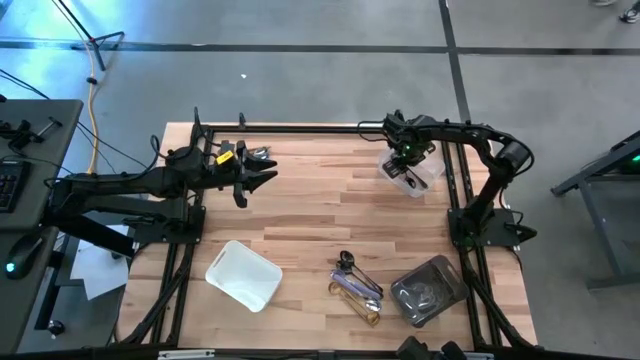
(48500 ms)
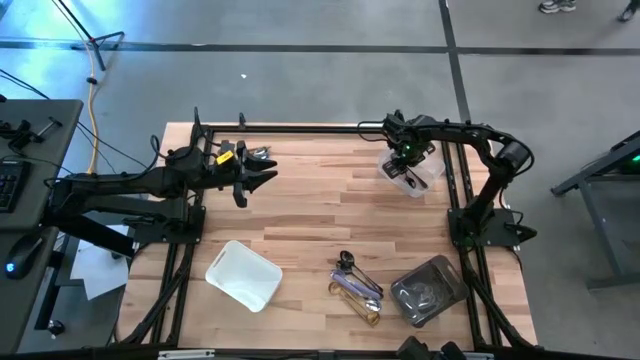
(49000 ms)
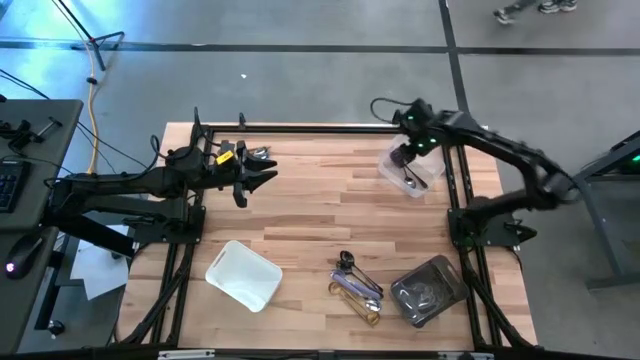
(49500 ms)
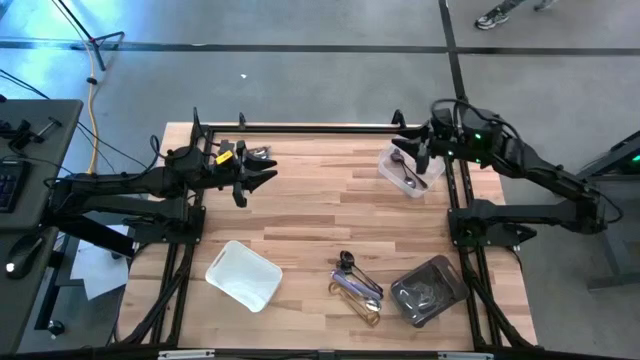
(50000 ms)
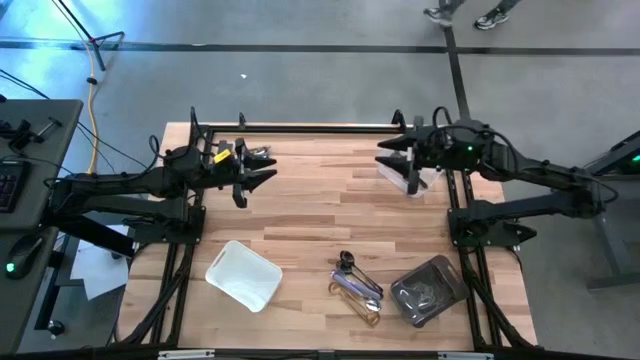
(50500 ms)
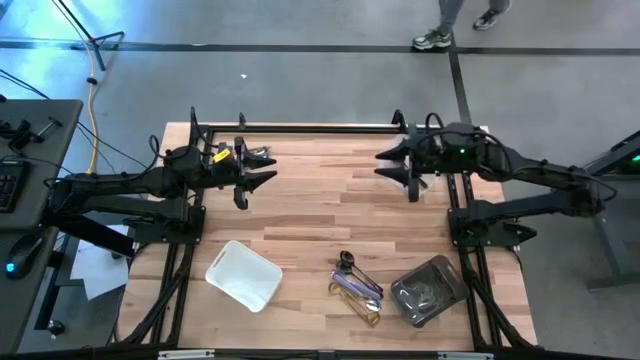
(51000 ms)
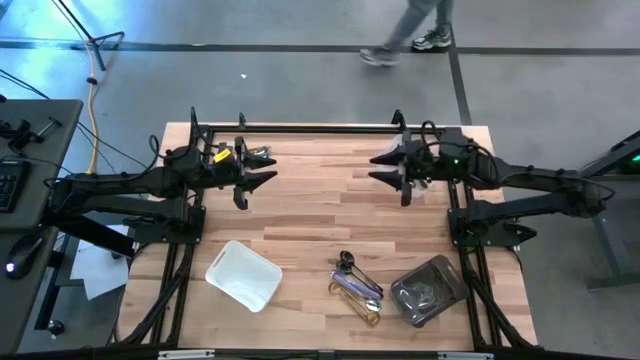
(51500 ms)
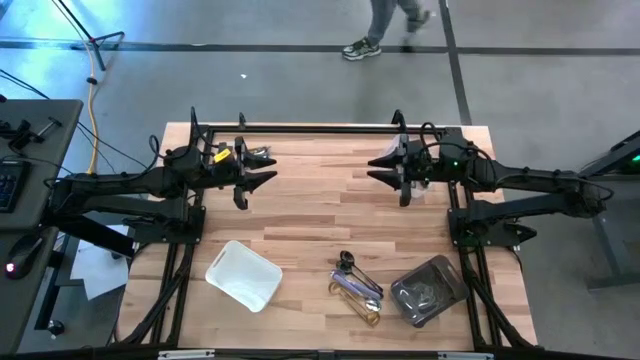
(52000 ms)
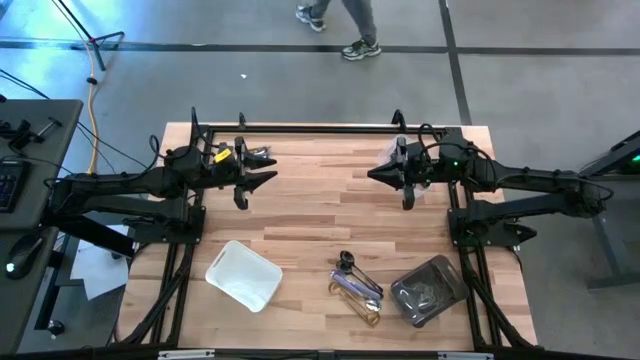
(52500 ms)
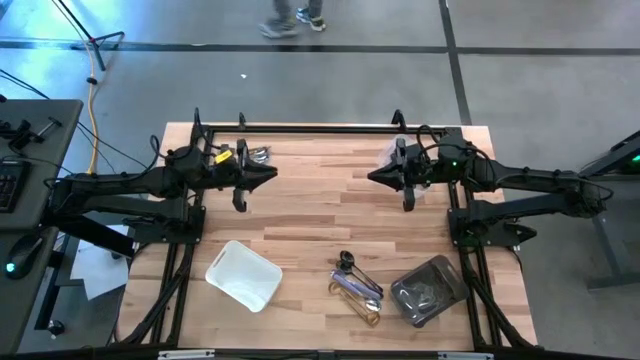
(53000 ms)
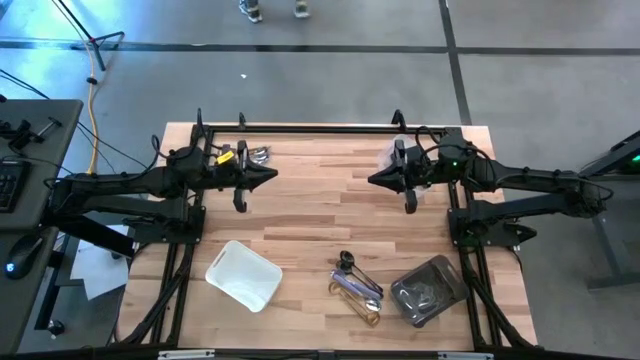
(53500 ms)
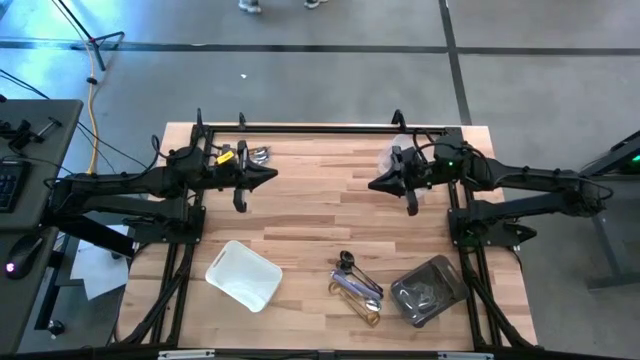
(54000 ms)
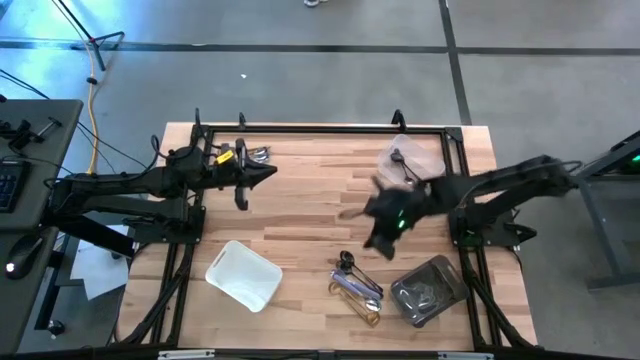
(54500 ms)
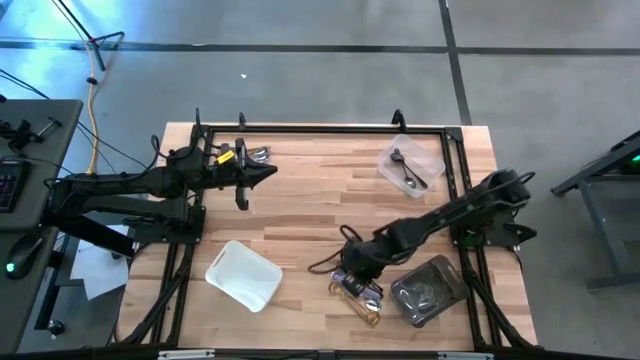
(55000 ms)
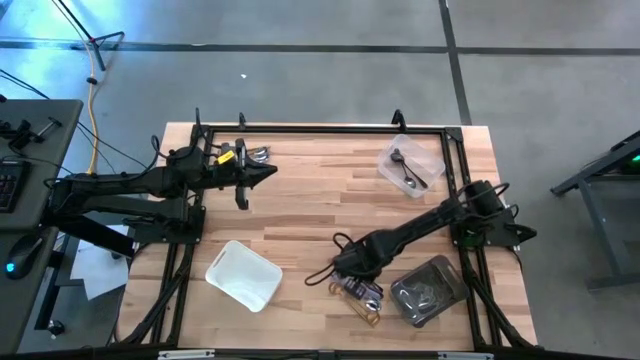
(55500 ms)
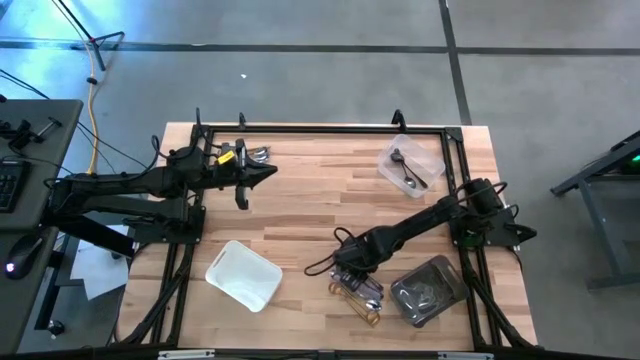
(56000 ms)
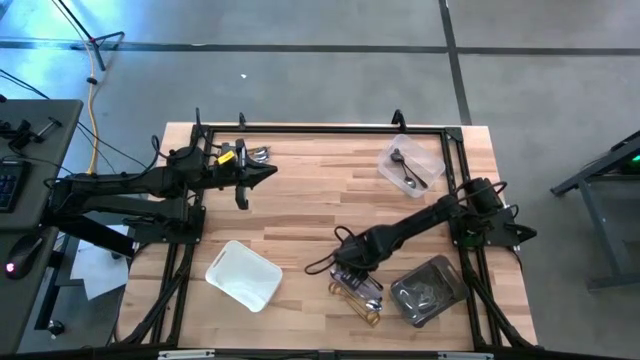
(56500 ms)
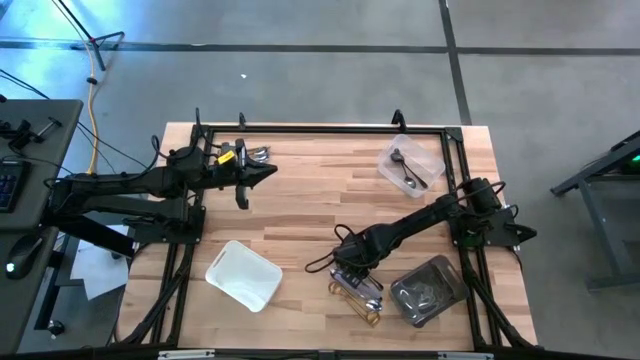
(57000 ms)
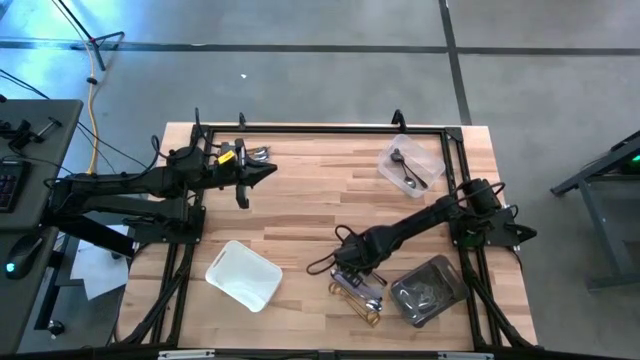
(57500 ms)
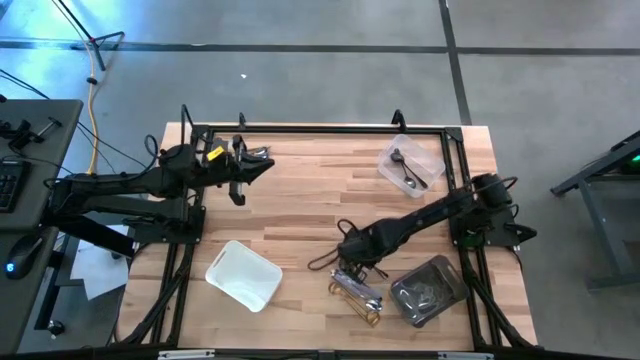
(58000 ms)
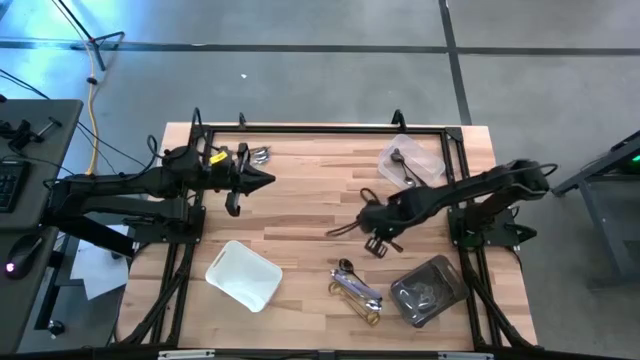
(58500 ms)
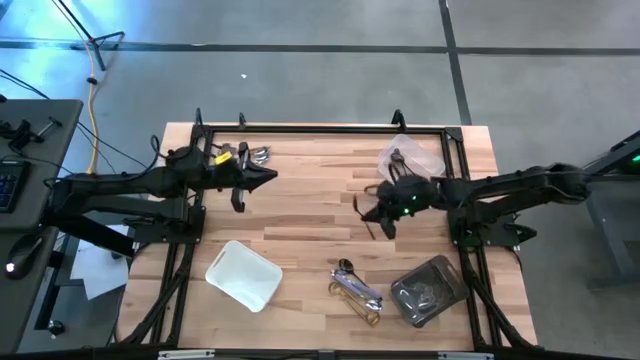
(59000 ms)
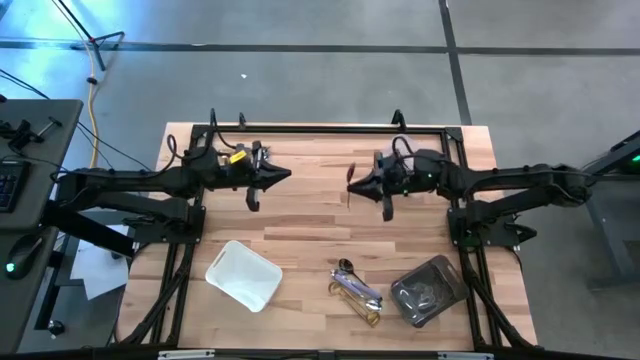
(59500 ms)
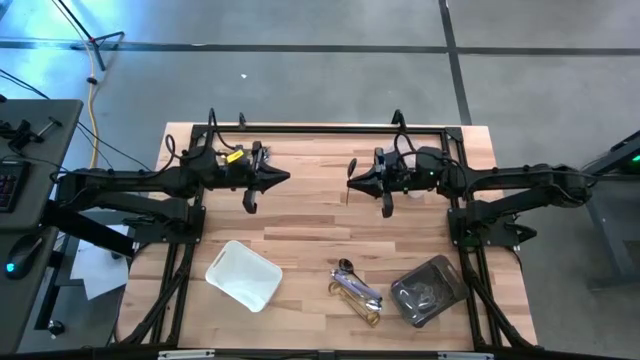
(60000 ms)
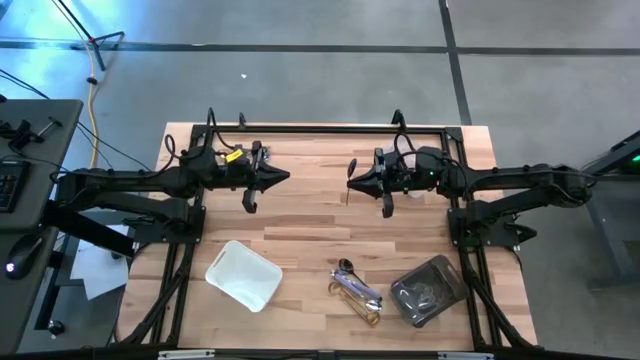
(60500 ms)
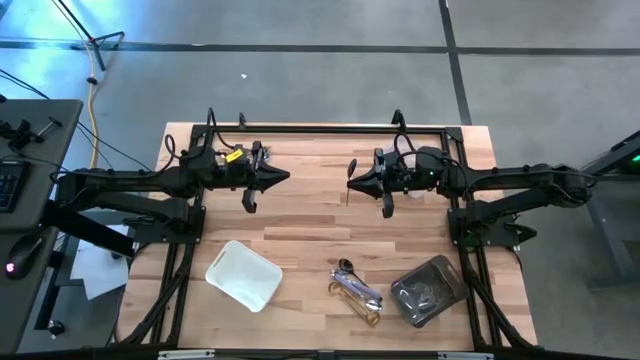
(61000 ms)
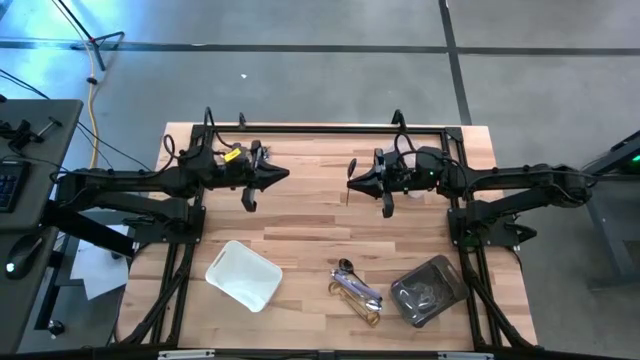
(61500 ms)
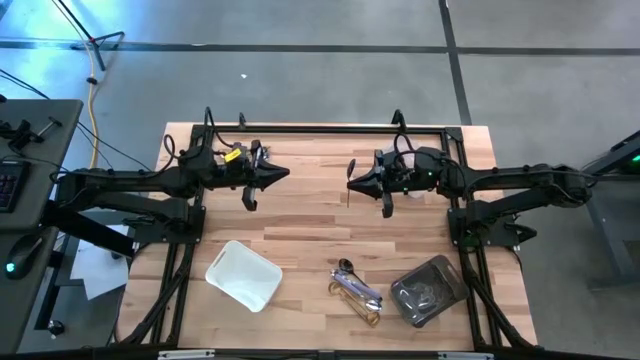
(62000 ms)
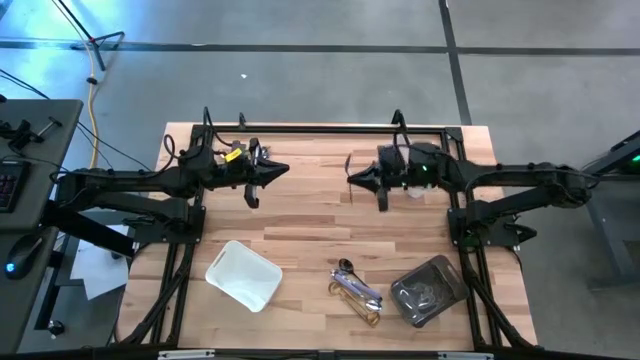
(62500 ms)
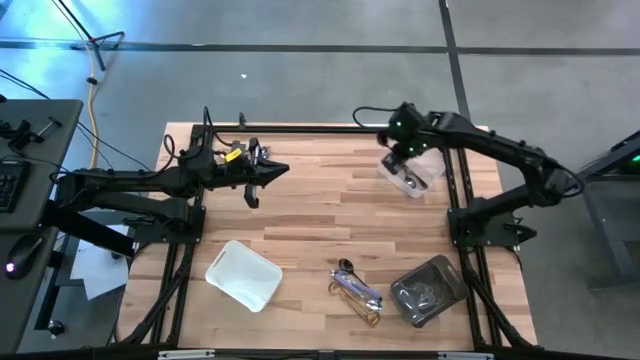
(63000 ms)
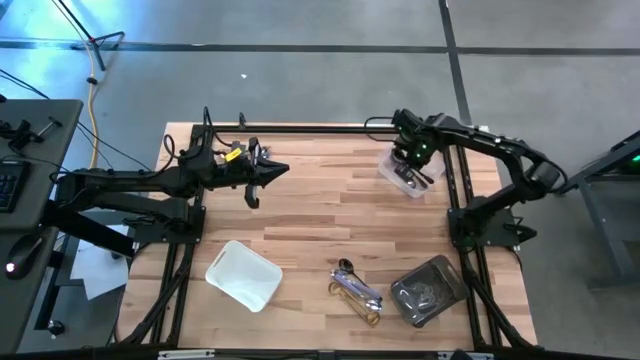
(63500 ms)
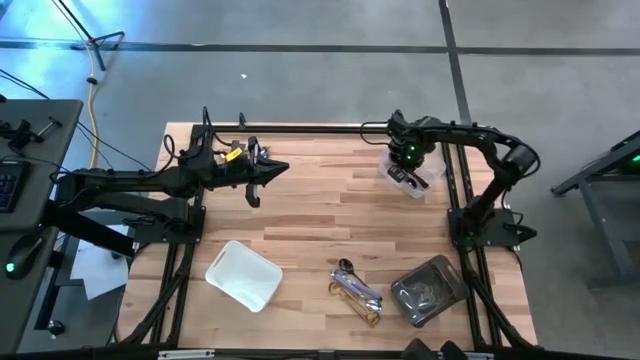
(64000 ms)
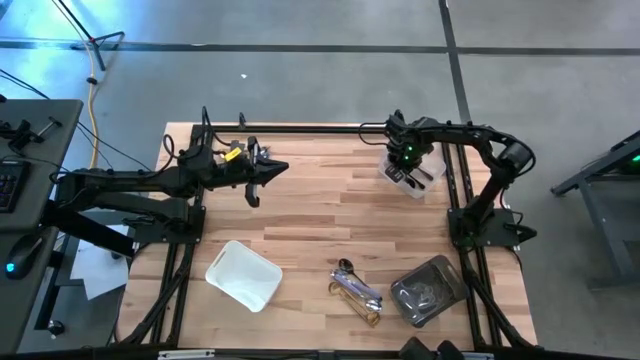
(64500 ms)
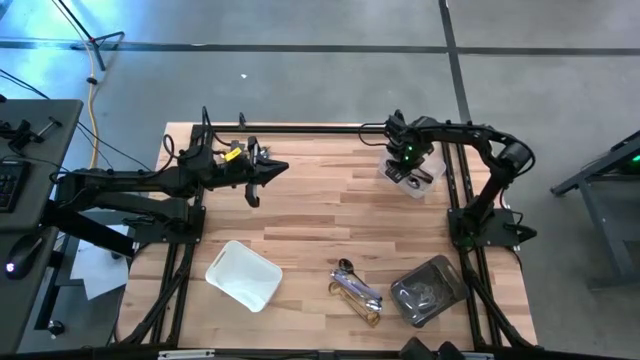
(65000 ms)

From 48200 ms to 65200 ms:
Task: Sort silverware by color (type)
Put the black spoon into the transparent bin

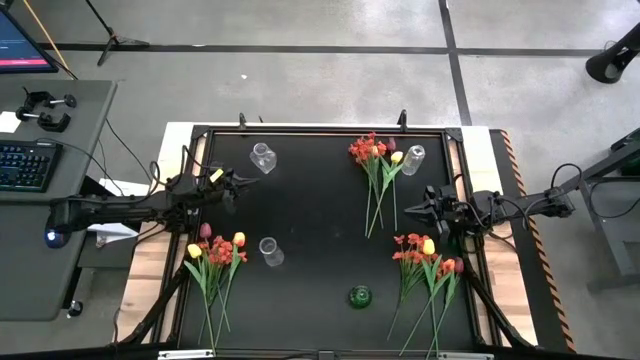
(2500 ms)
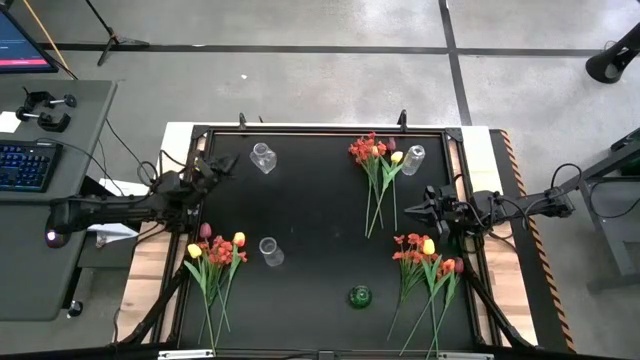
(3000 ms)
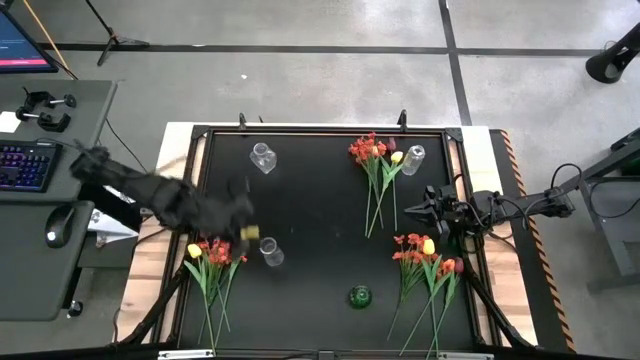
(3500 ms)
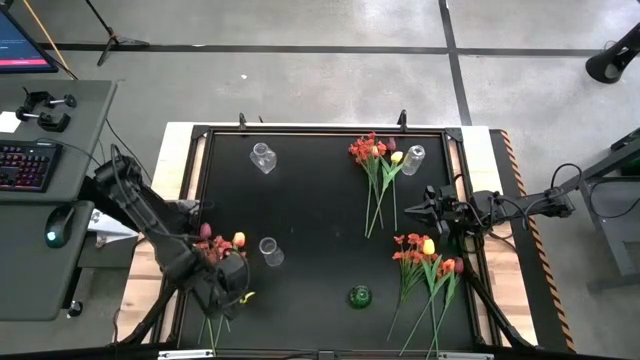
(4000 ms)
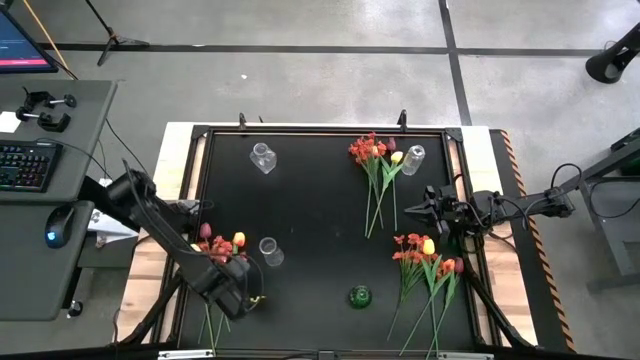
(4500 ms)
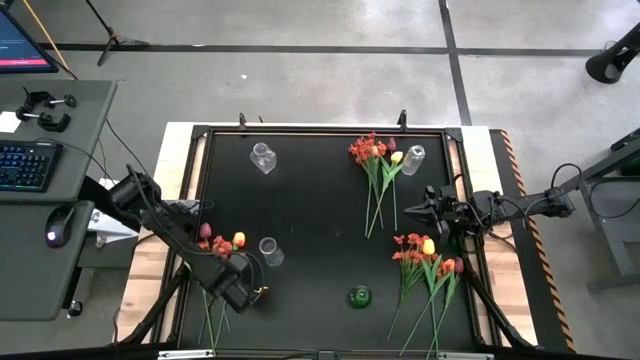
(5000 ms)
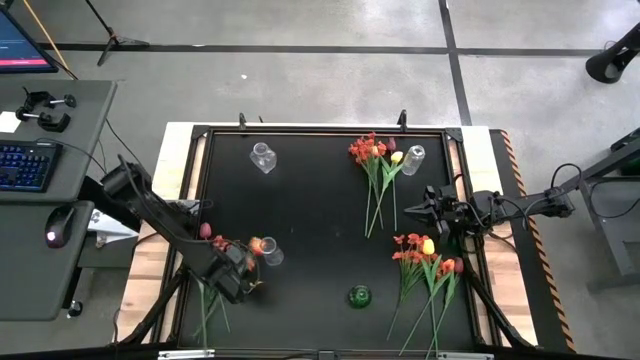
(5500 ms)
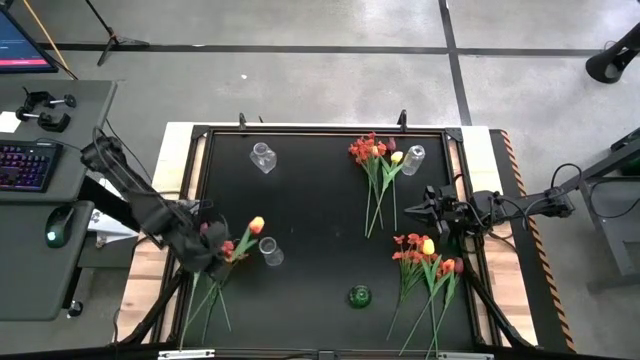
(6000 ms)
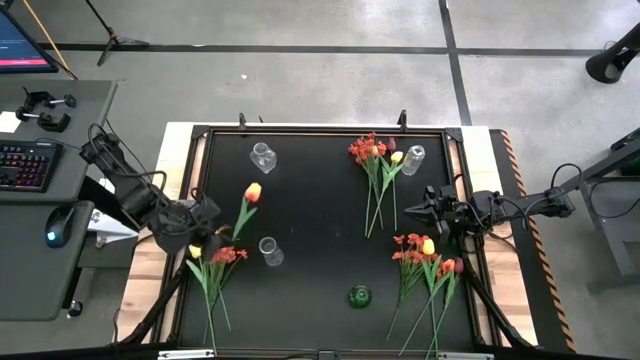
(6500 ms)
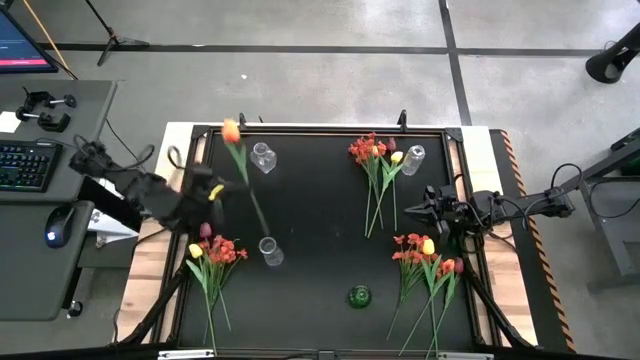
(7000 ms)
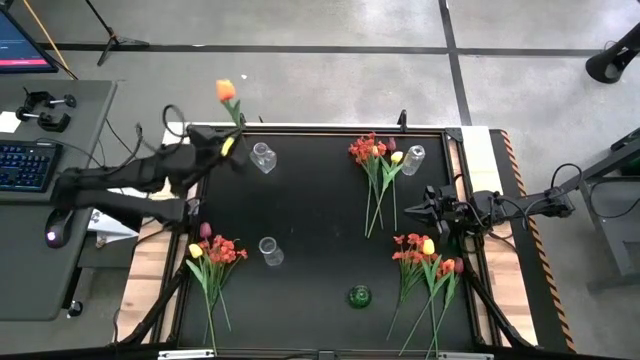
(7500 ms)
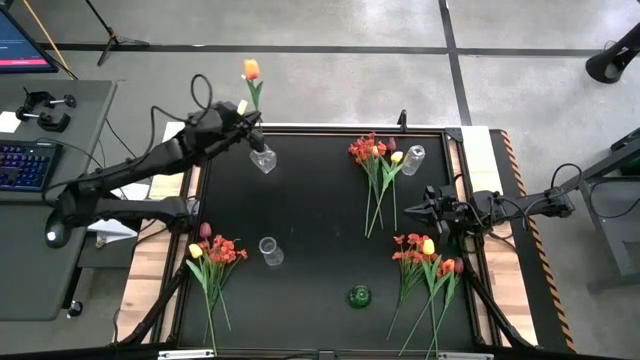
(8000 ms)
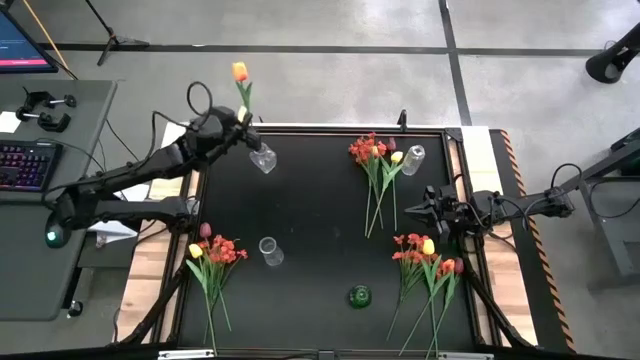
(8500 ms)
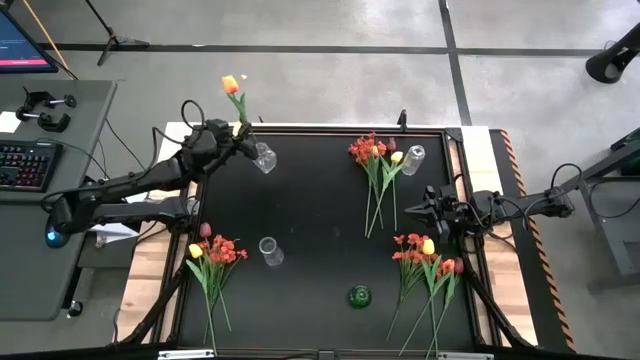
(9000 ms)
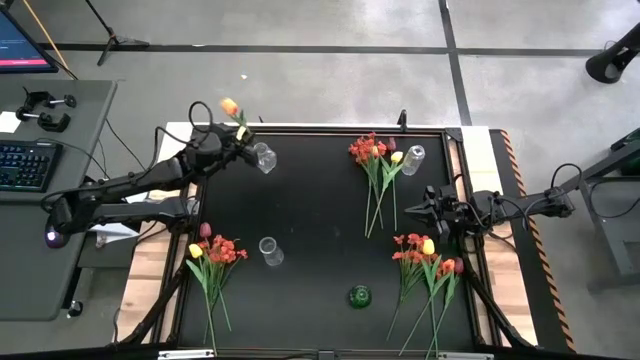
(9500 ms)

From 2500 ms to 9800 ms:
Task: Sort flowers into vase by color
Put the bottom left orange flower into the top left transparent vase
